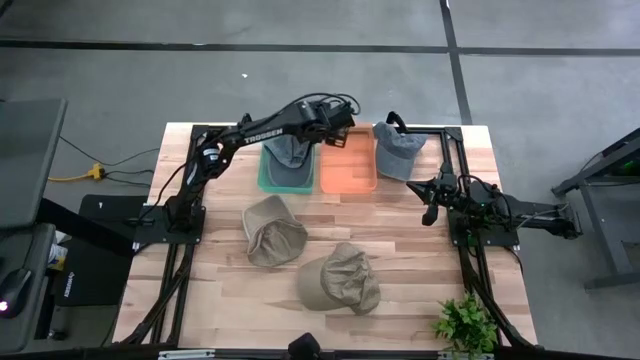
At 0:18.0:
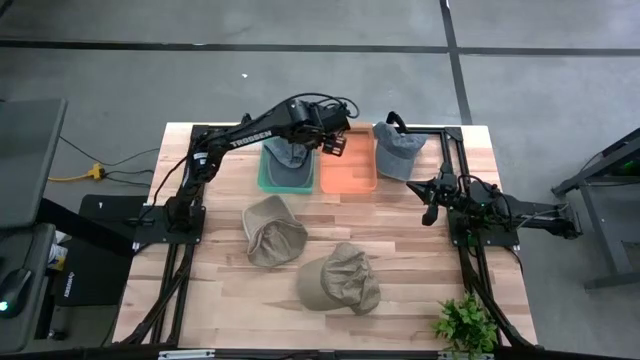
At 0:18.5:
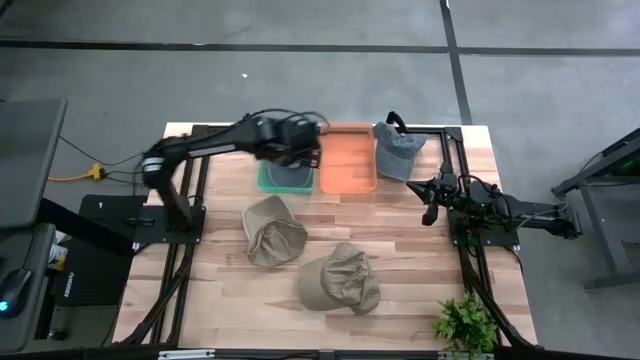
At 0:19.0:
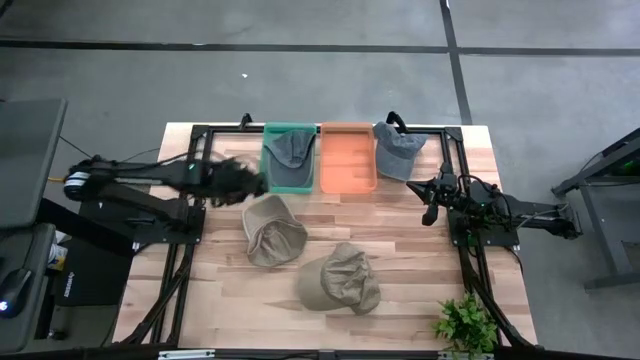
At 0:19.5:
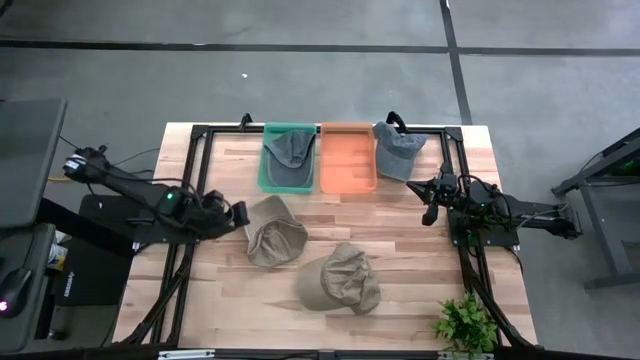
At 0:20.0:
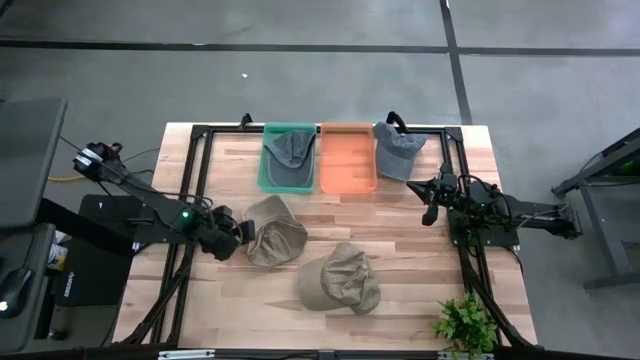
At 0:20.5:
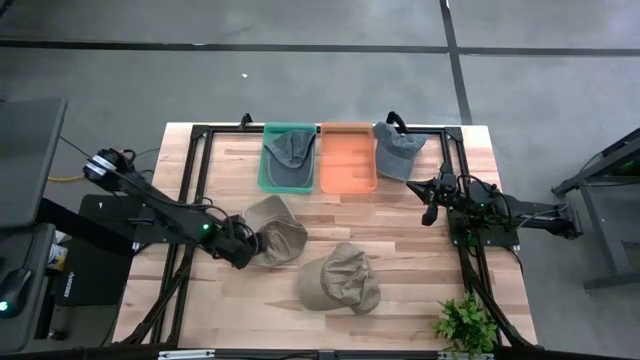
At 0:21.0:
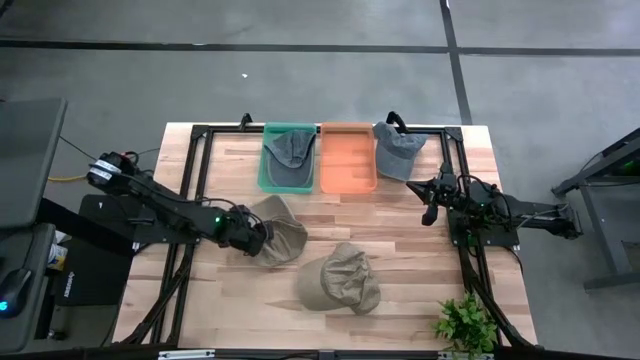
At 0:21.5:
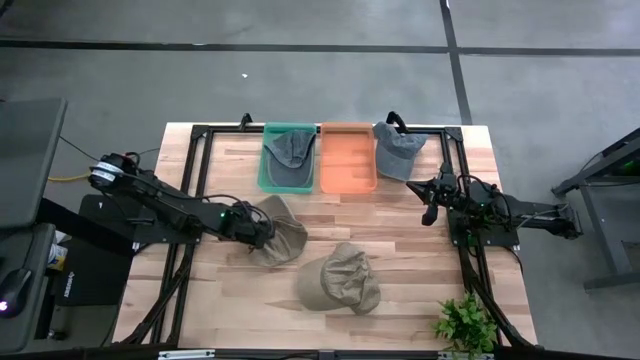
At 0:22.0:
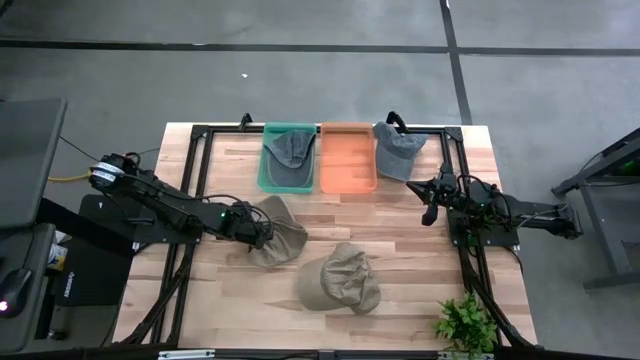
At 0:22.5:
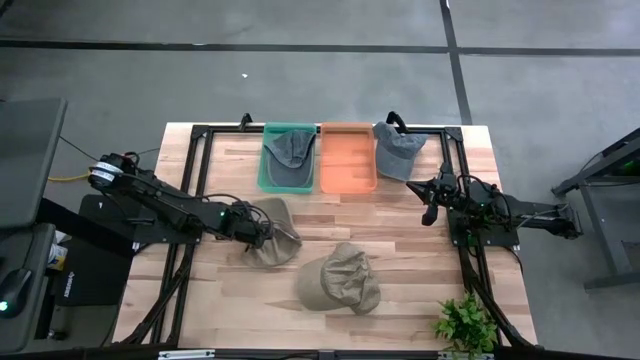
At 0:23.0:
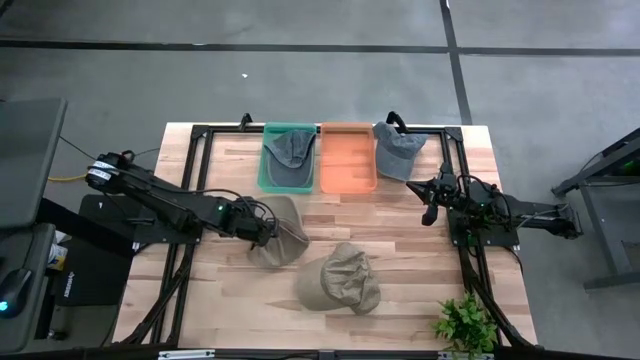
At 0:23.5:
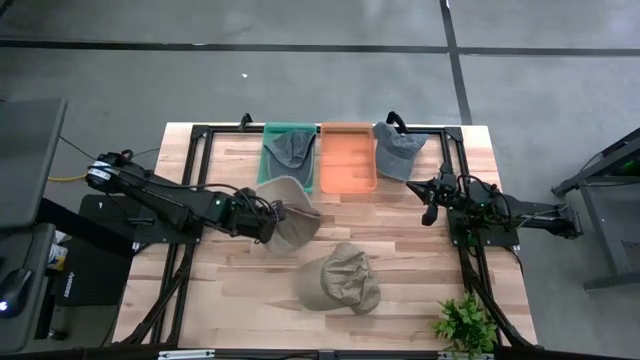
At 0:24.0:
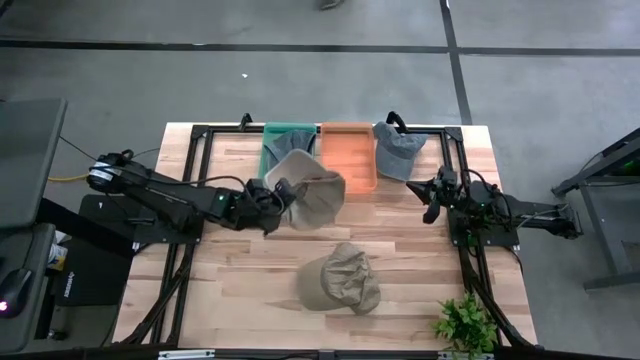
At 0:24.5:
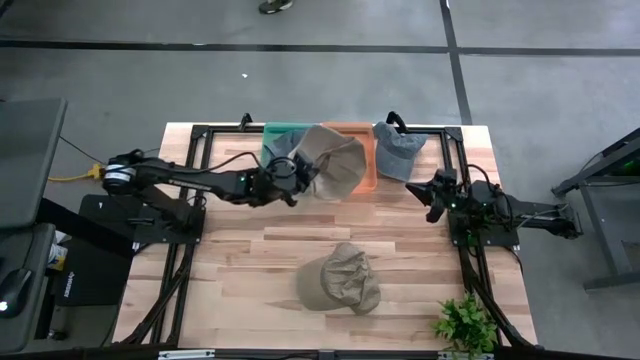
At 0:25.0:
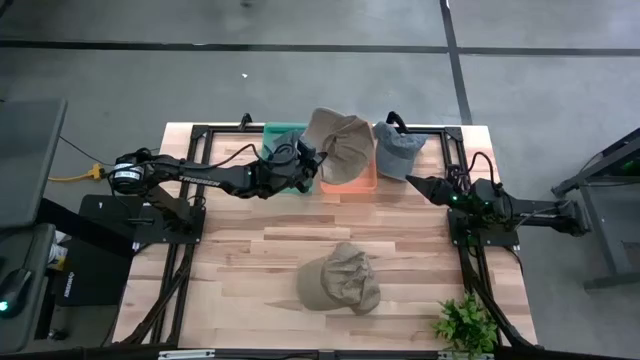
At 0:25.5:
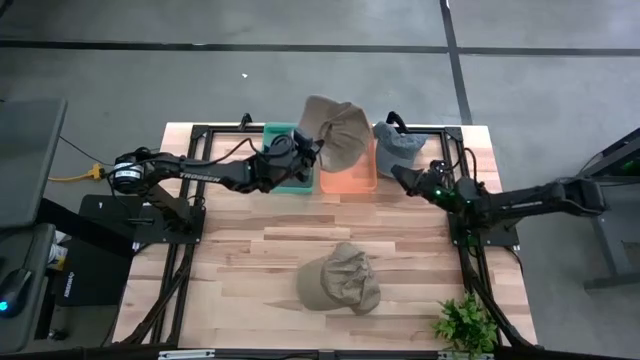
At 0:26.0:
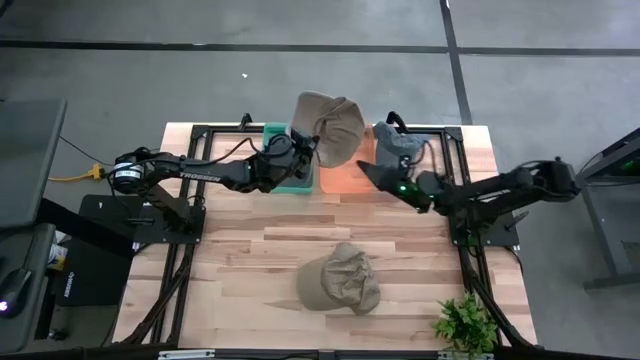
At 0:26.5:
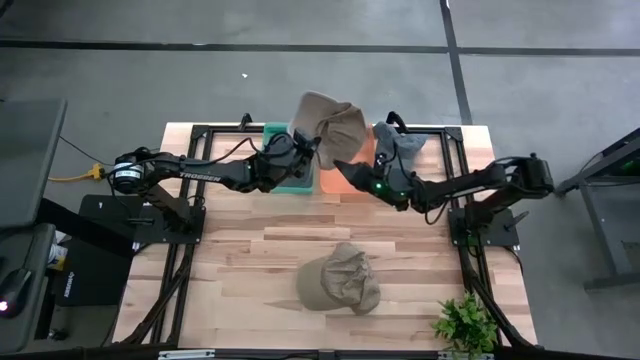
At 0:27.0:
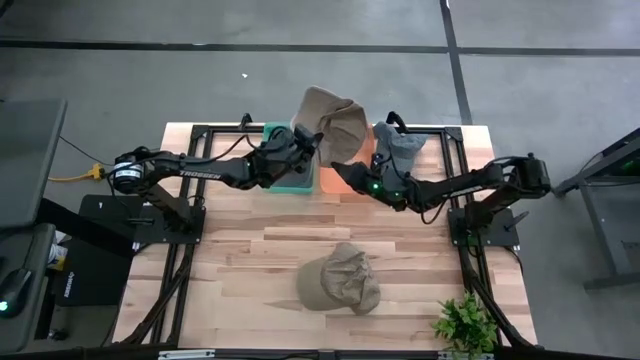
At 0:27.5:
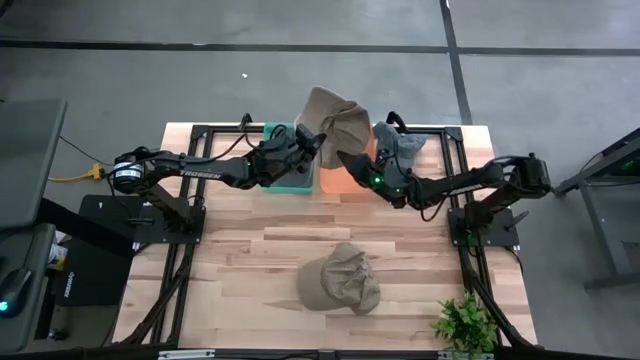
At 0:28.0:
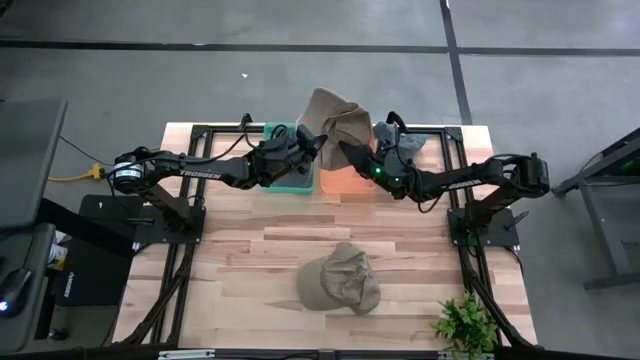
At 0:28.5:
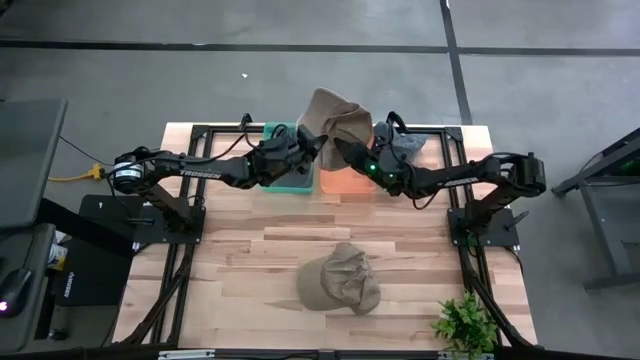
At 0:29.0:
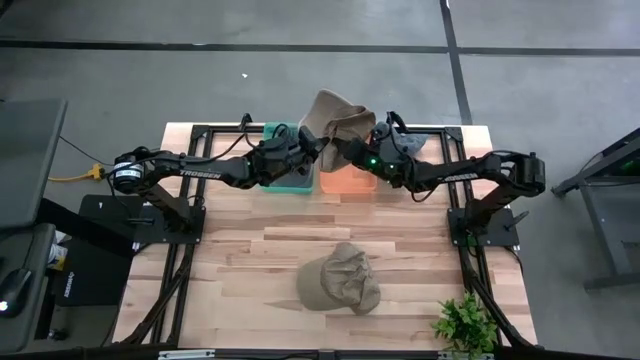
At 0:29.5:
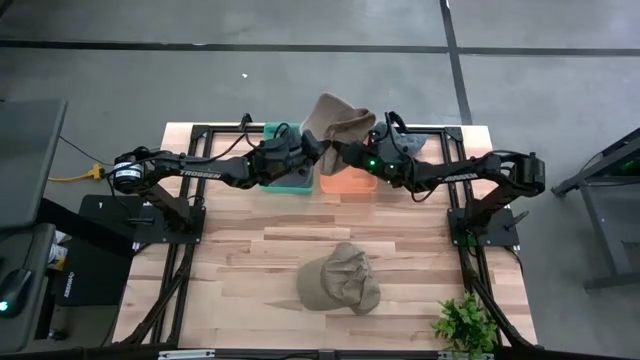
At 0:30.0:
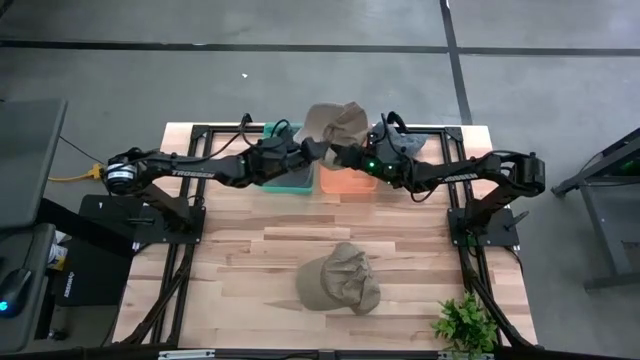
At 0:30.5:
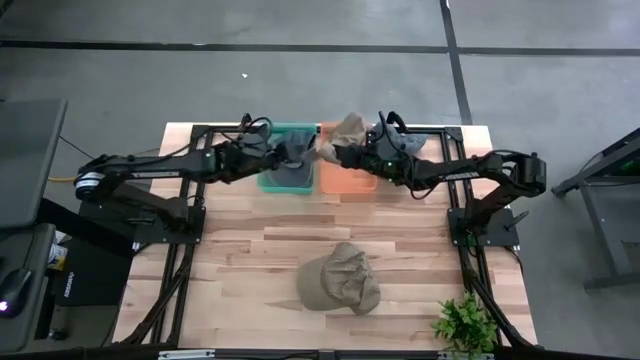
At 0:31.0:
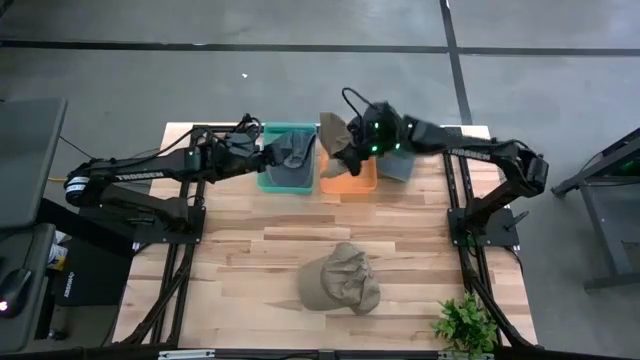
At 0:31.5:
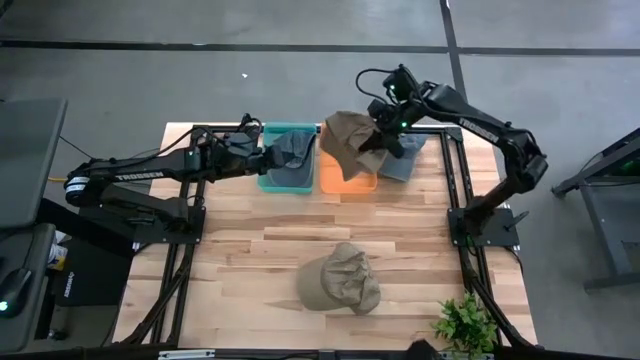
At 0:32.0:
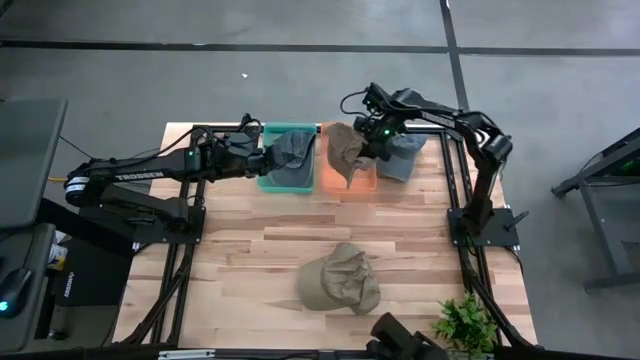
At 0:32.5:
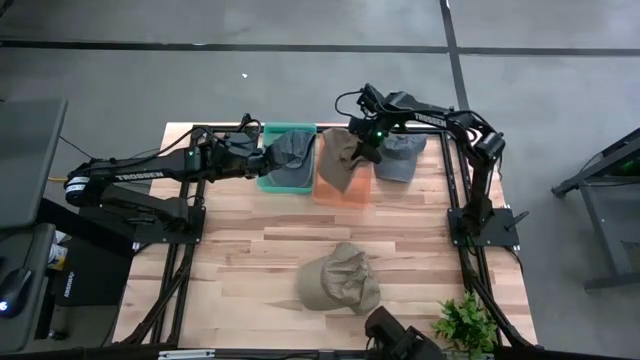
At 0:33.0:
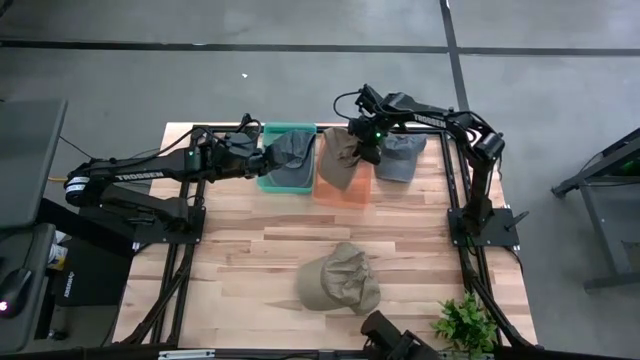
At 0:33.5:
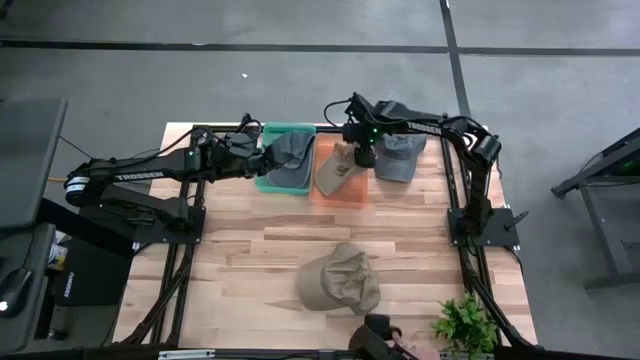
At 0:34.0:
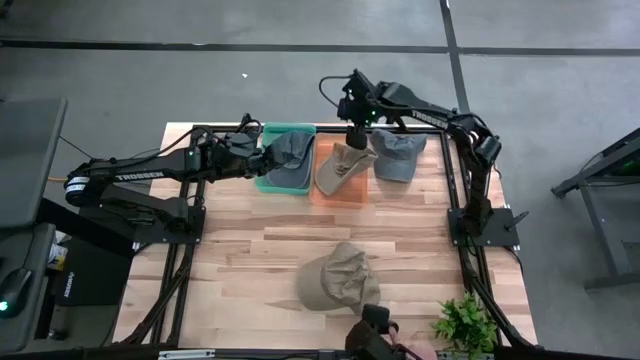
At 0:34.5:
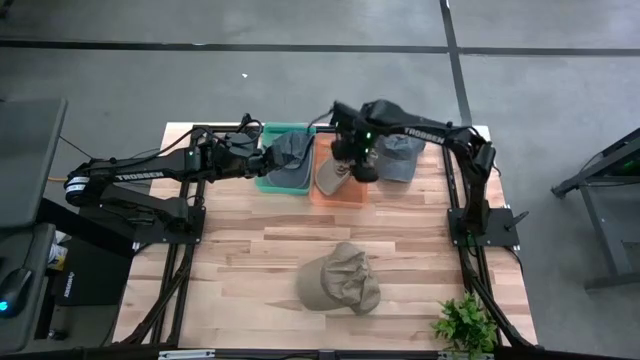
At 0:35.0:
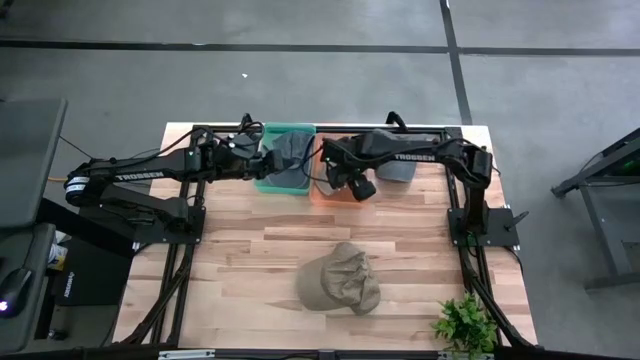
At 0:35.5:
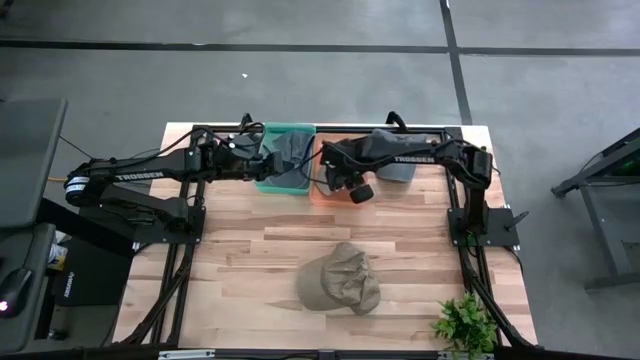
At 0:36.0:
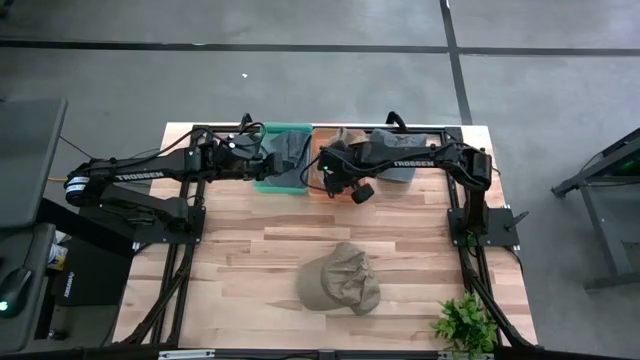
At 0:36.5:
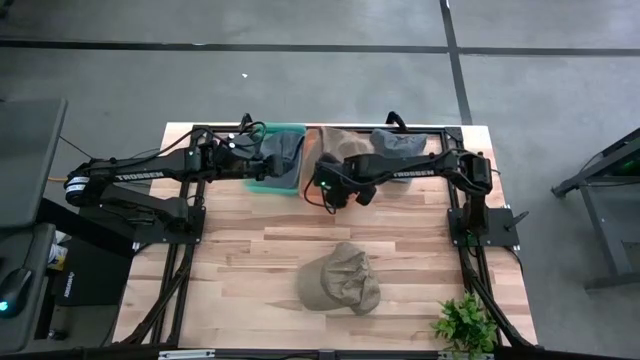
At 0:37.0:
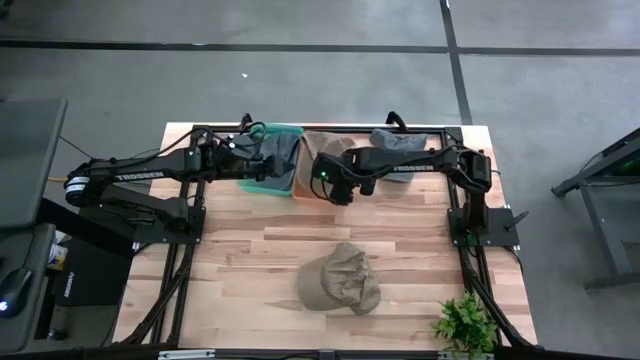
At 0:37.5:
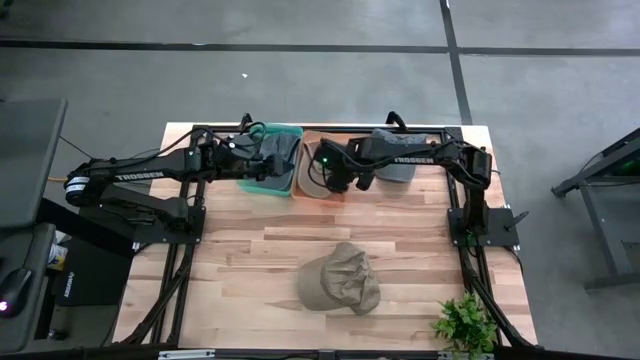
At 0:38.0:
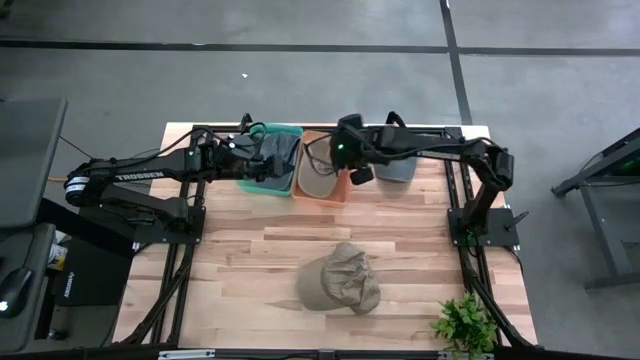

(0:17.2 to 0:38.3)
Task: Pick & Place hat
Put the left brown cap into the orange bin
